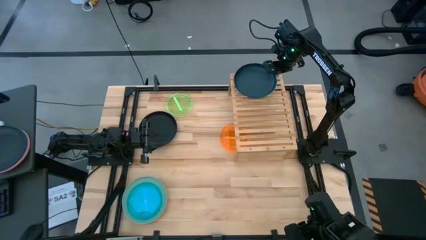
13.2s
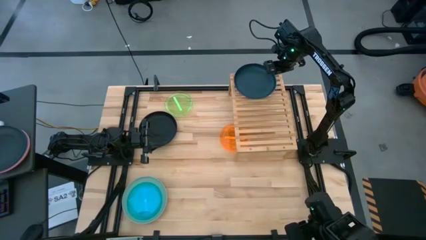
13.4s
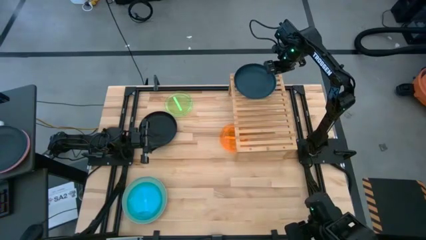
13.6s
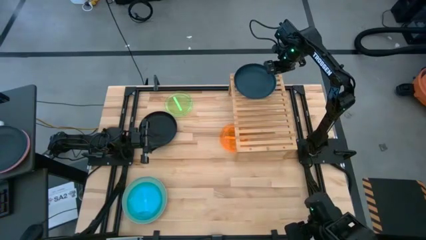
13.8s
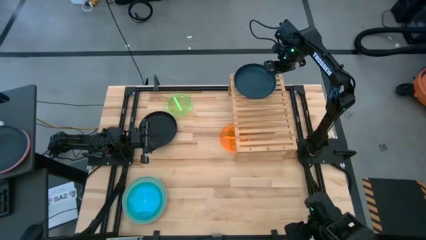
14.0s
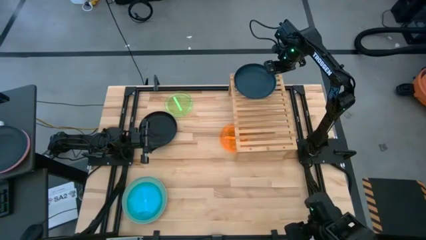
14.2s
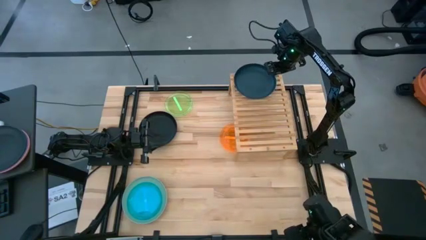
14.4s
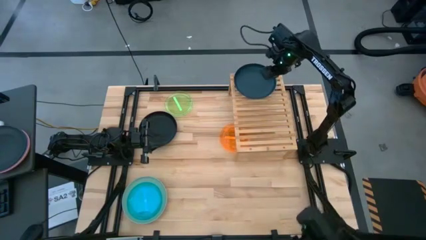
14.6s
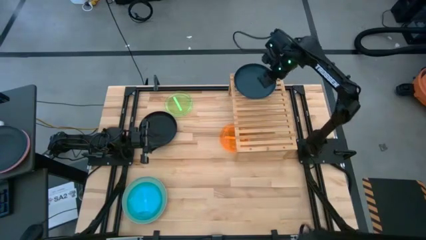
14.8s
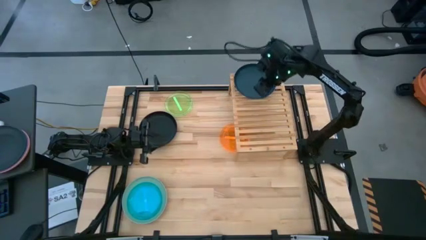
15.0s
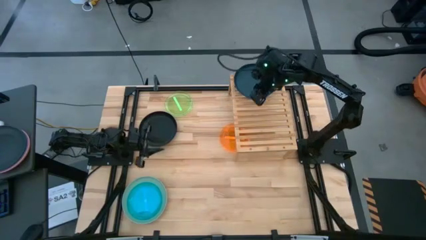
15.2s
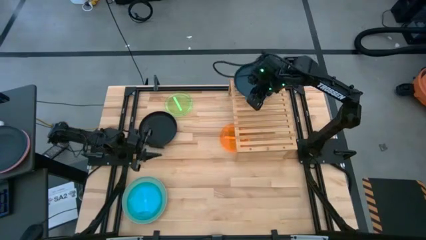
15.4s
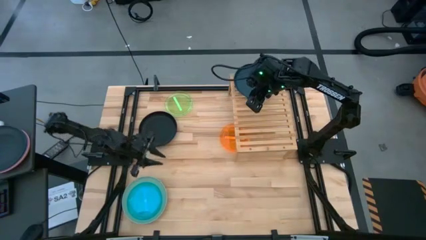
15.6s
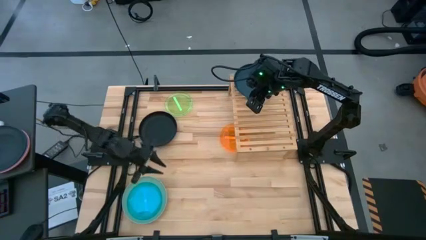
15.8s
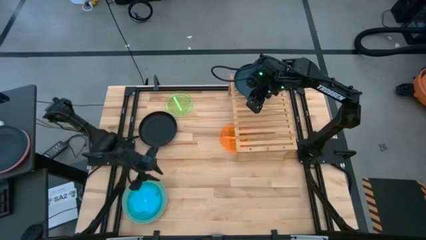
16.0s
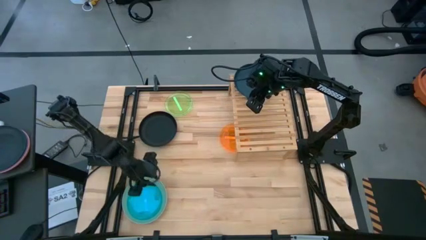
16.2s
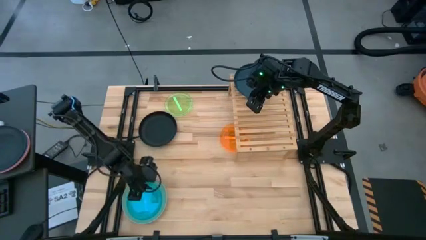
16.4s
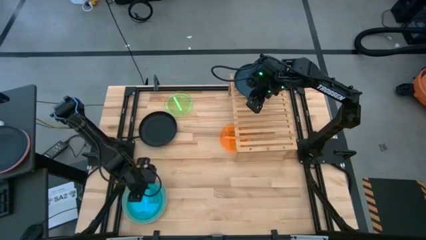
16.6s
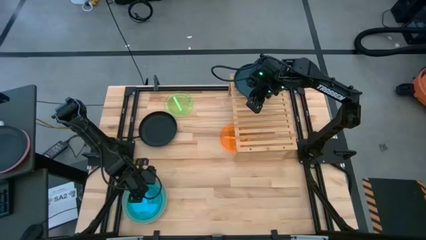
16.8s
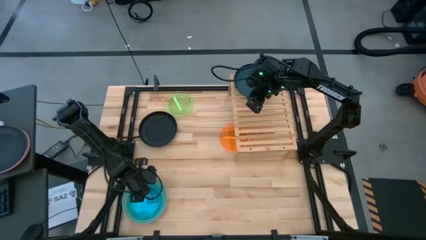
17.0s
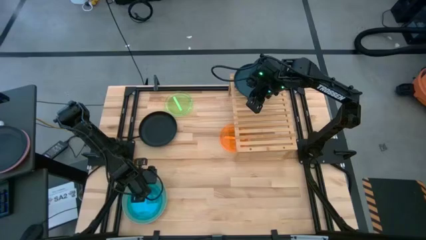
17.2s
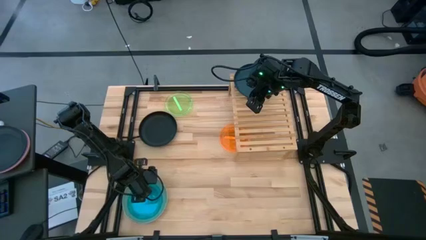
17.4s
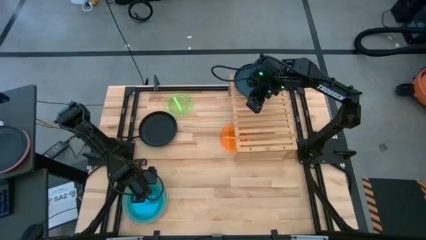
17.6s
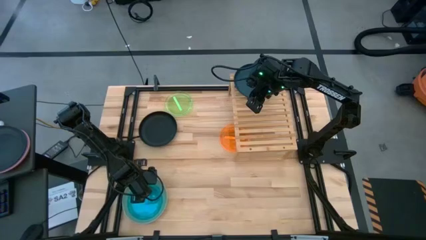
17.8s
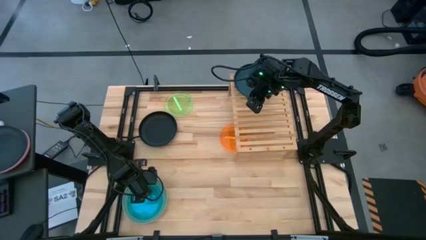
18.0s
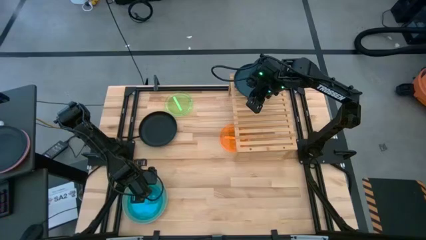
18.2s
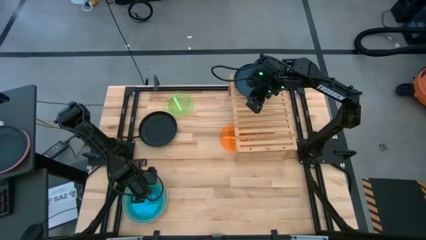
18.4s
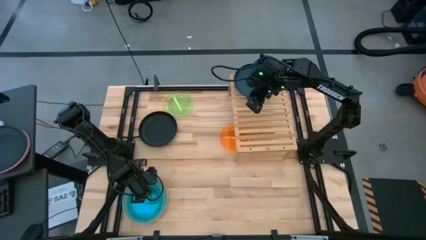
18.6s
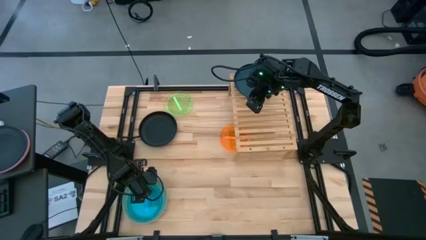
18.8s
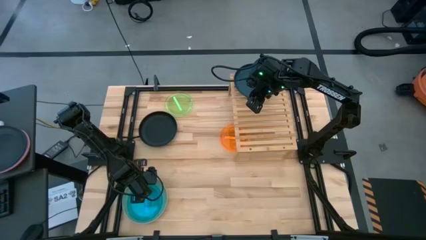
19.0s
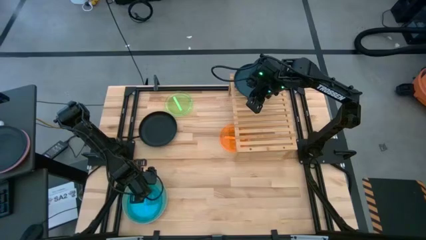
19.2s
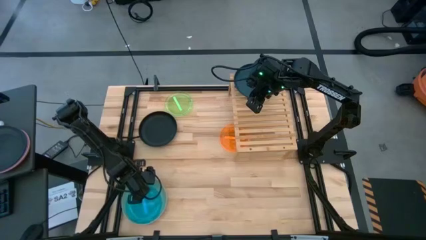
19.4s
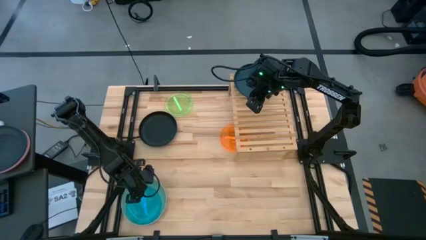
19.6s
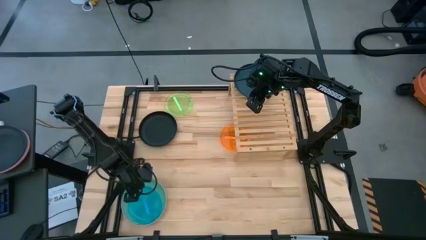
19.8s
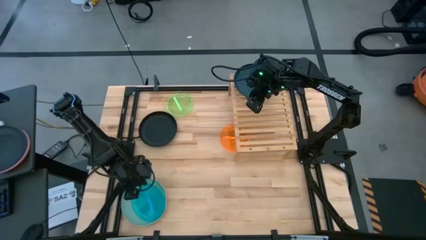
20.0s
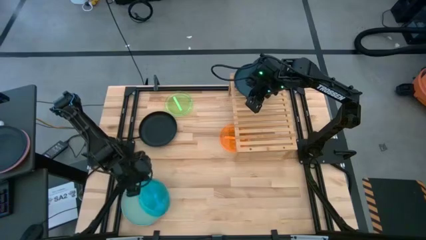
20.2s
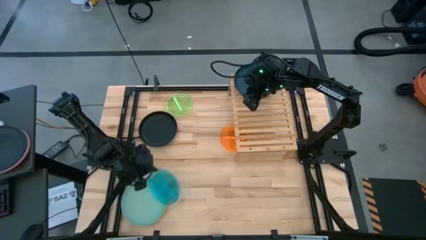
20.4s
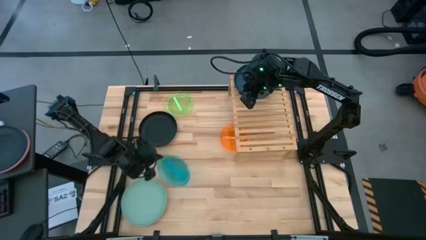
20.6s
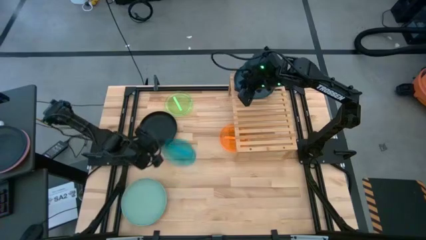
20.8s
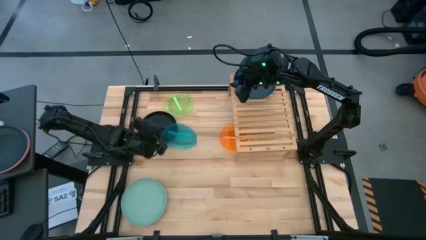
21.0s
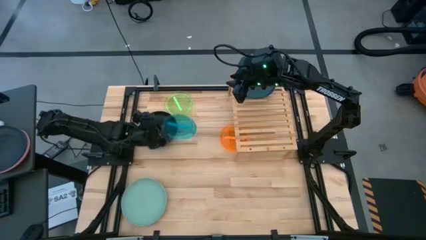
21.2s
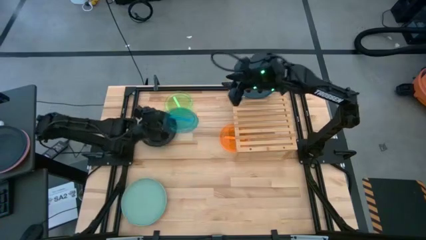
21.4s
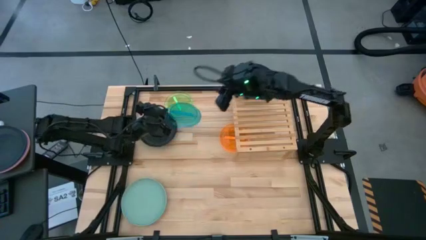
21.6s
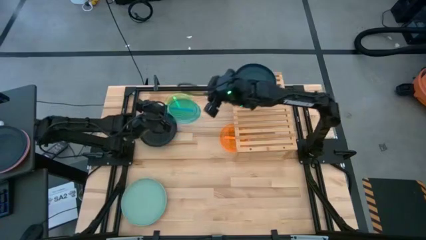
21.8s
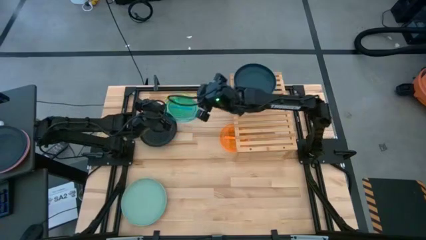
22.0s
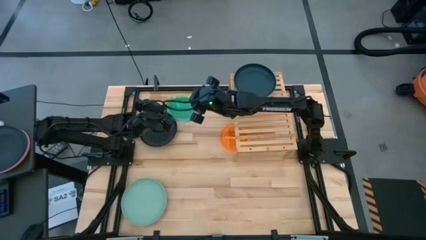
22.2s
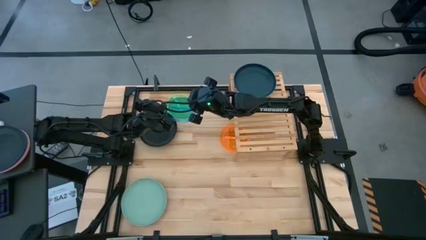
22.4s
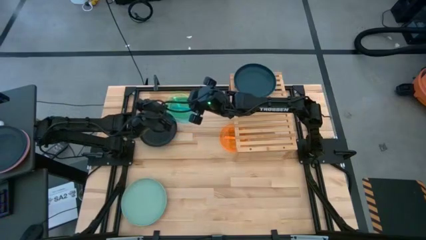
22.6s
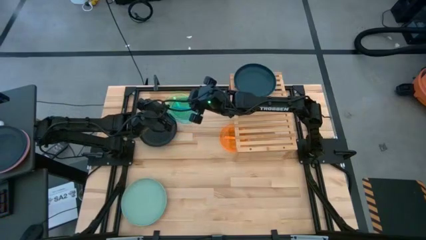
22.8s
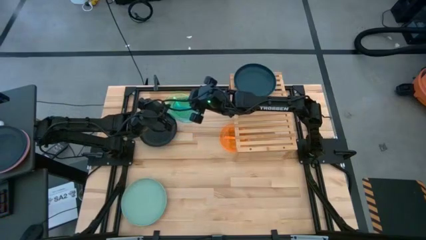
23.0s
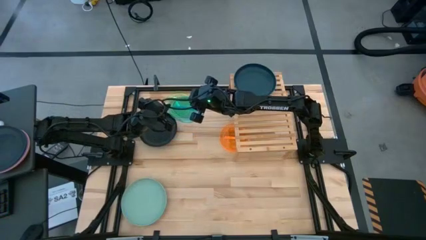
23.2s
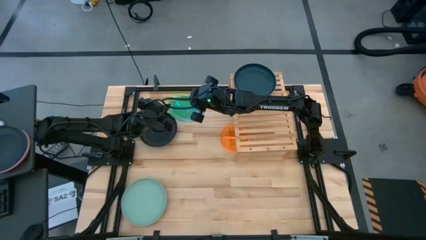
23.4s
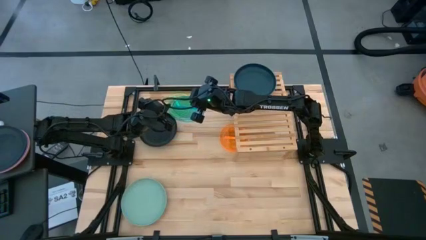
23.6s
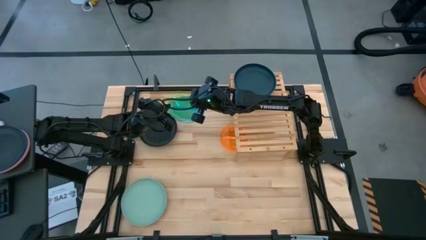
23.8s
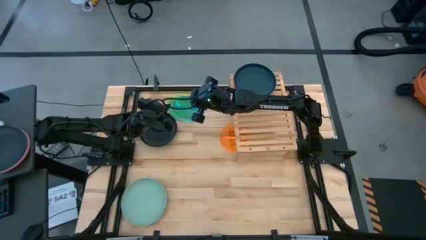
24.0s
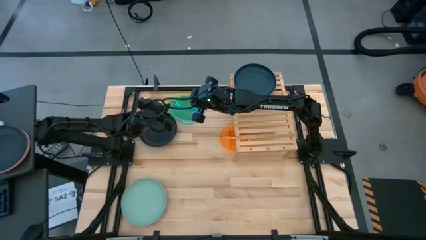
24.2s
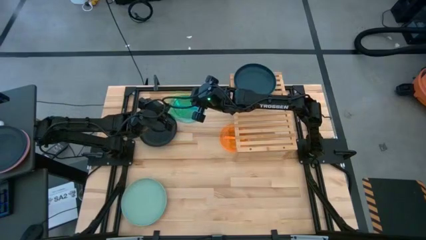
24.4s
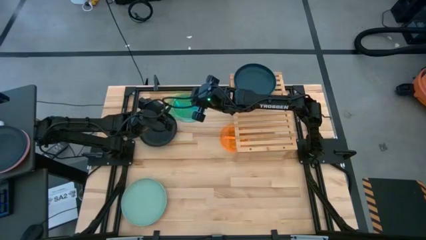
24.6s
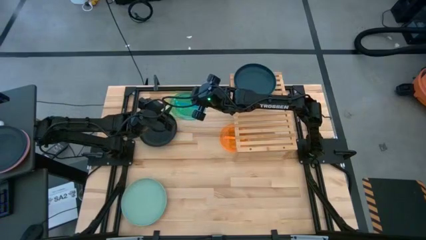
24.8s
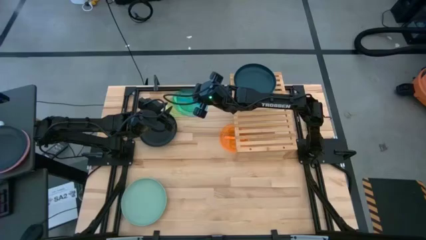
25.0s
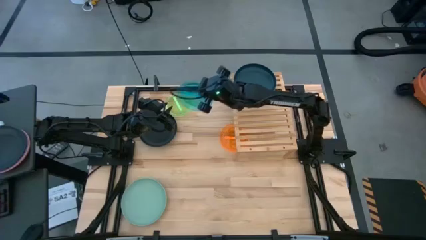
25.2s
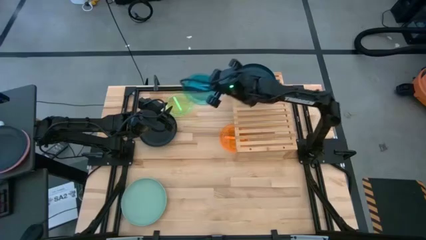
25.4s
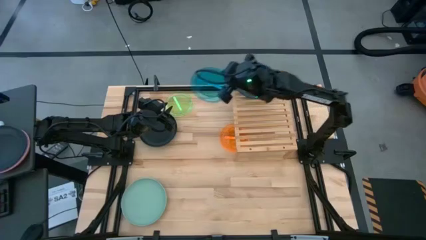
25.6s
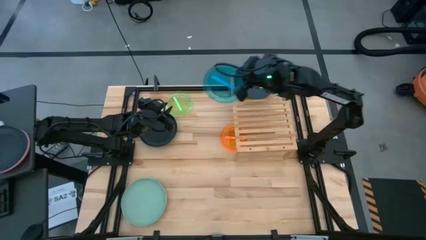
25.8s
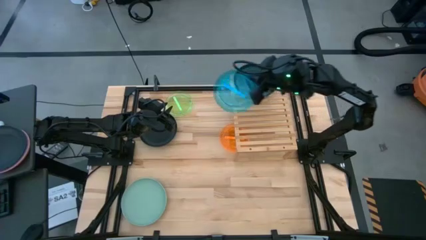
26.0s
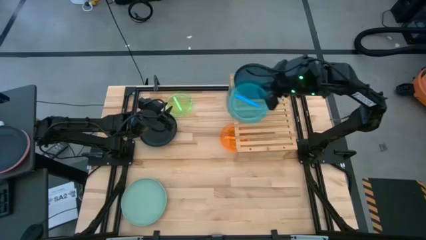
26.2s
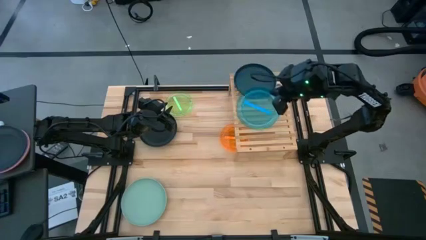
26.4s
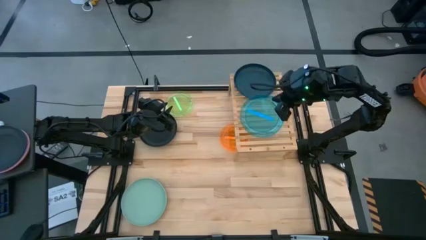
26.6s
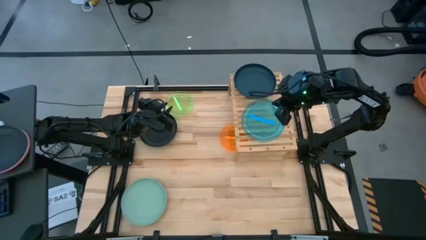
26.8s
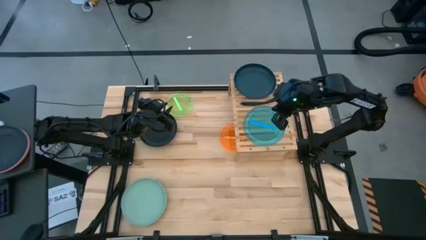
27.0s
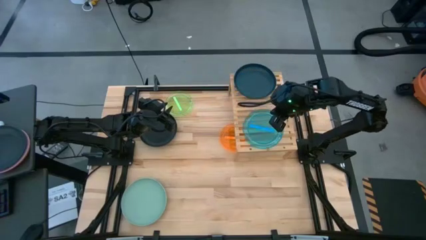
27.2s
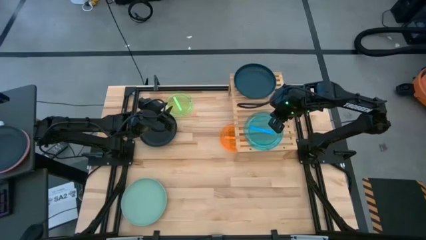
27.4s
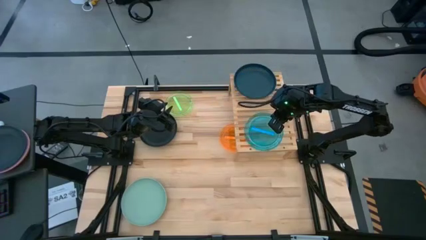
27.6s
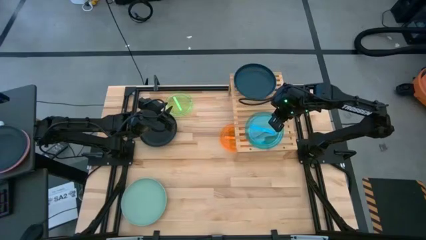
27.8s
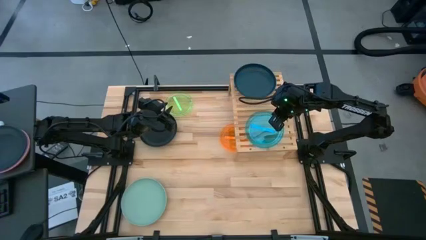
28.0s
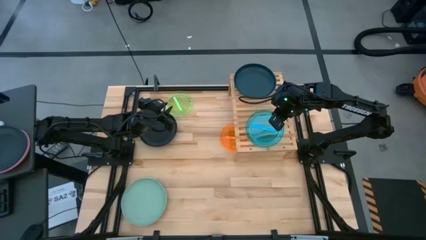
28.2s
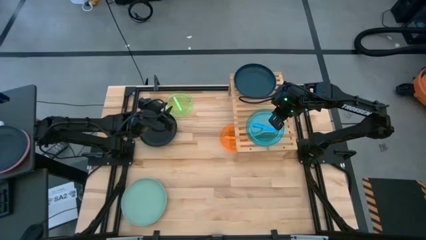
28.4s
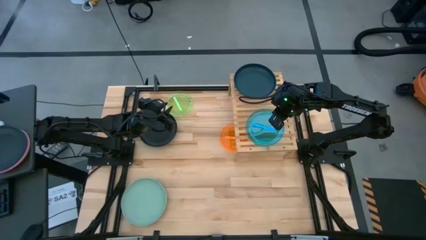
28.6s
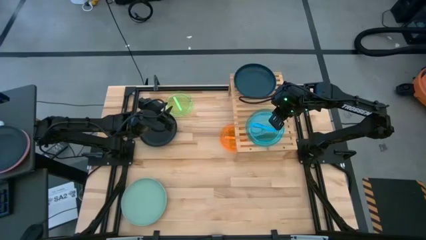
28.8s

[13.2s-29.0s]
Task: Place and stack plates onto a shelf
Put the light blue plate on the shelf
